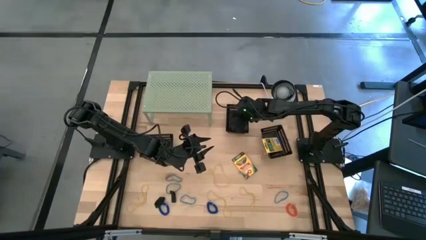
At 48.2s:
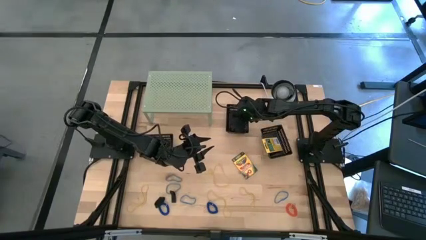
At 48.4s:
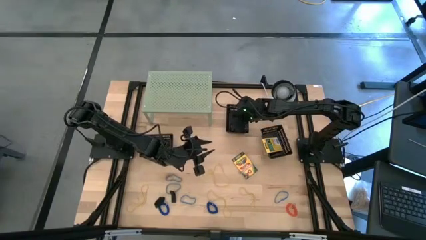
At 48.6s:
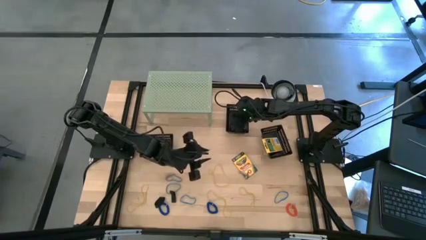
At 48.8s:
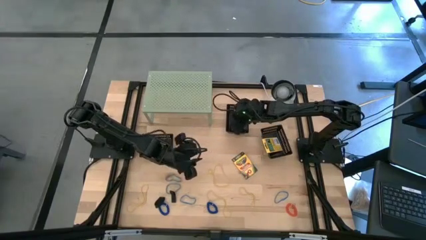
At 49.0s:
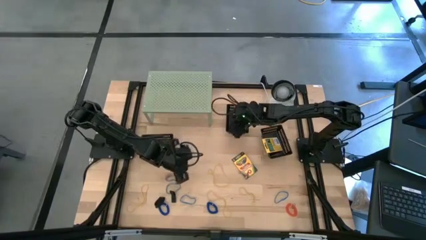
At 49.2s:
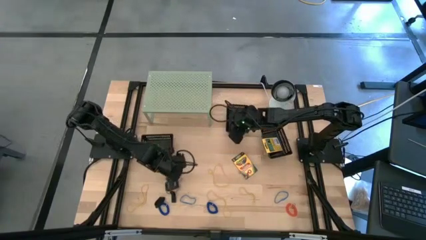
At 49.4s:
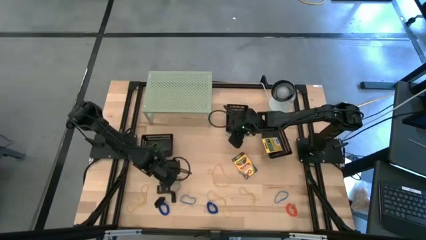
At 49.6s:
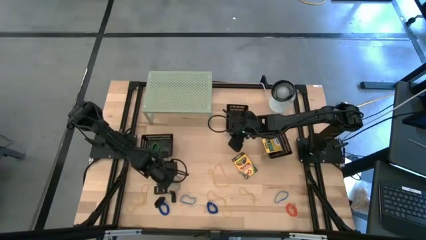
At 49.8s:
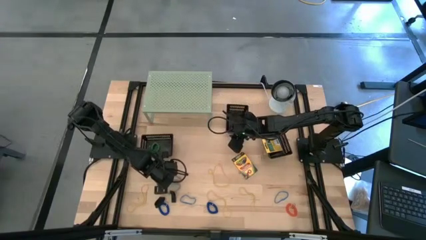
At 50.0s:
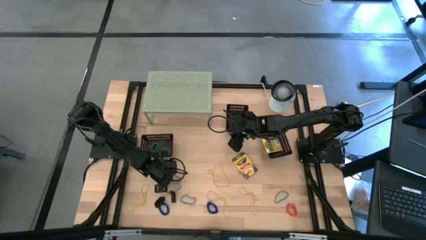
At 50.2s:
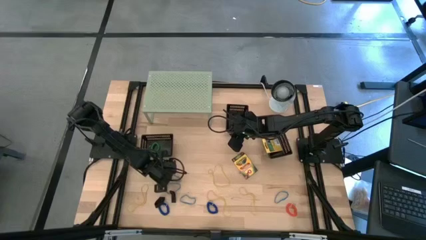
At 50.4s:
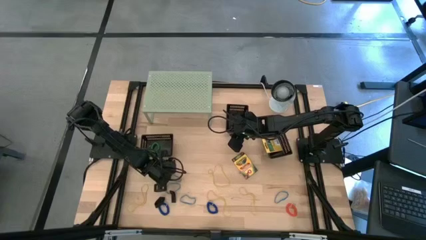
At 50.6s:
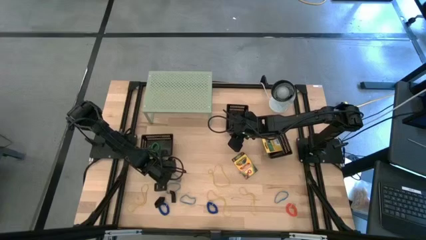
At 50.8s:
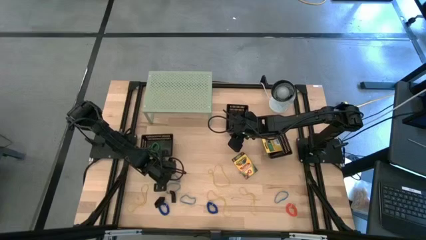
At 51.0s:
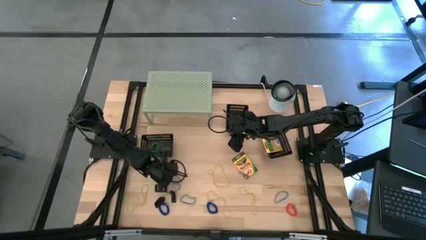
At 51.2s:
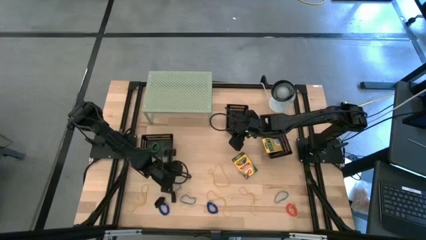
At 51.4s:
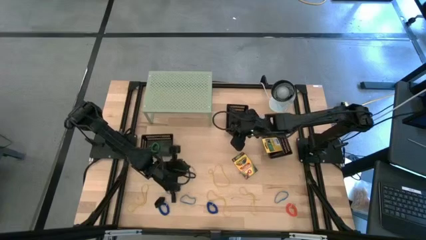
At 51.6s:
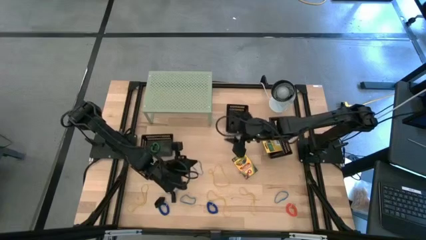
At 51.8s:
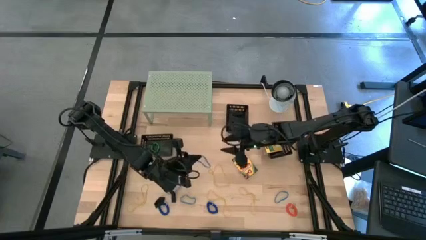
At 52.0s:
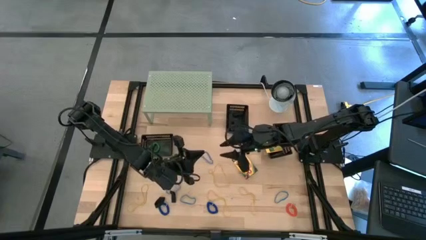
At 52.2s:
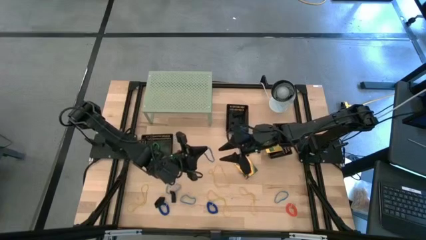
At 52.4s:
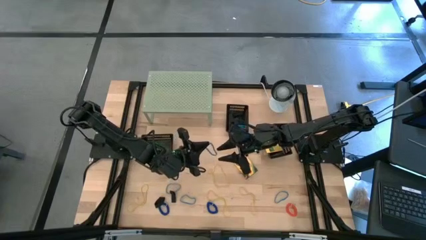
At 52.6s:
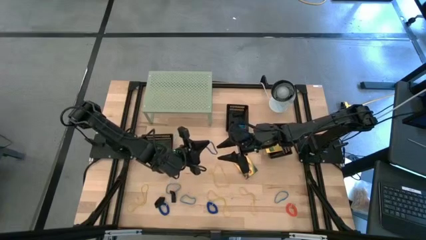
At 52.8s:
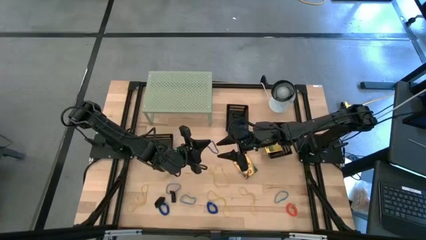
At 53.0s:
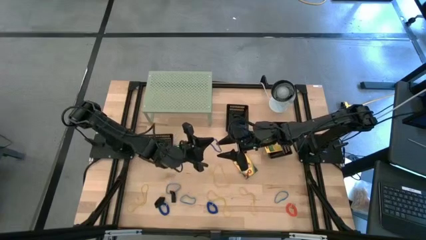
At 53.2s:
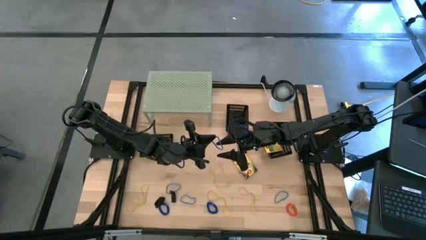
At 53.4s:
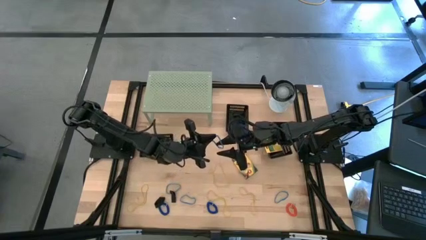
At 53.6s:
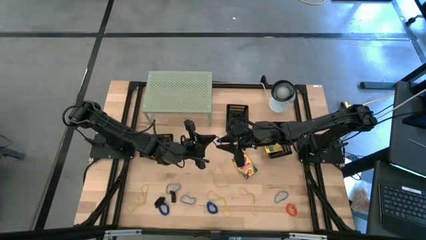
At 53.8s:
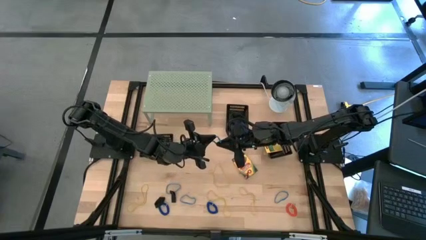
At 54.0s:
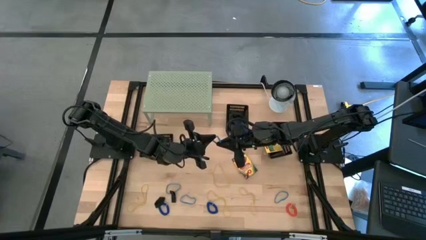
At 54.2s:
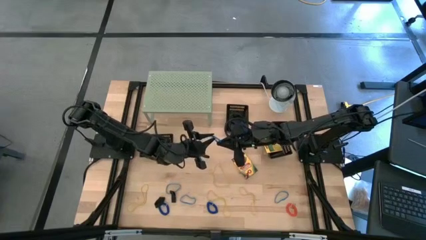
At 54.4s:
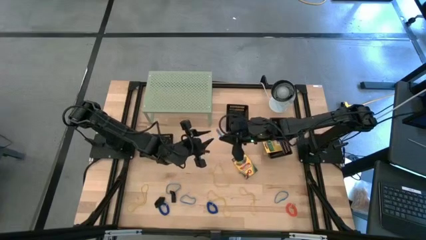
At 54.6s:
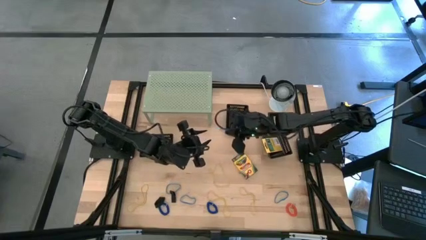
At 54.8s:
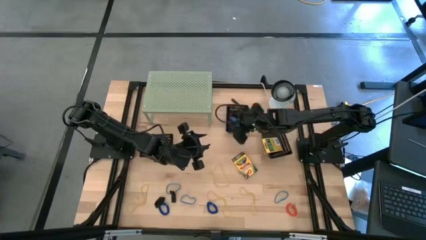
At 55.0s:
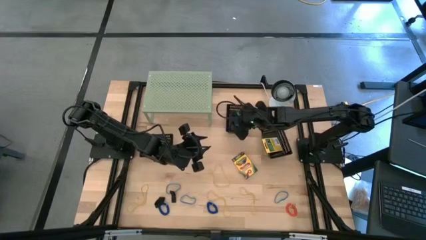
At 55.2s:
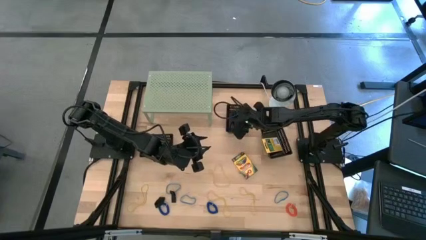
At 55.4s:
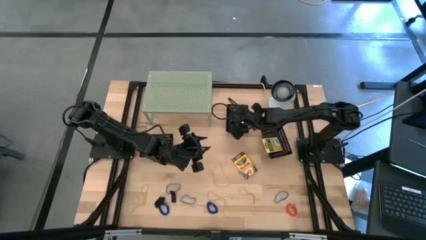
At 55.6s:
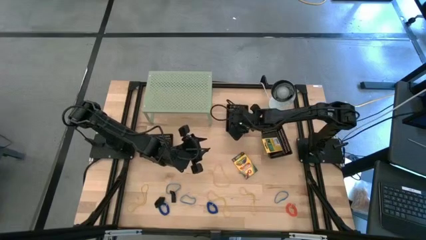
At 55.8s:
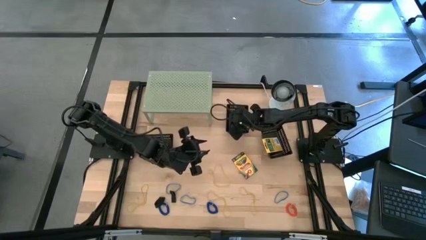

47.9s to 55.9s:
Task: Pick & Place Office Desk Supplies
Put the blue rubber band into the top black bin

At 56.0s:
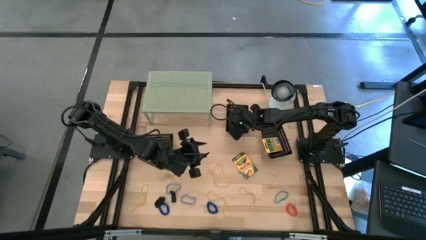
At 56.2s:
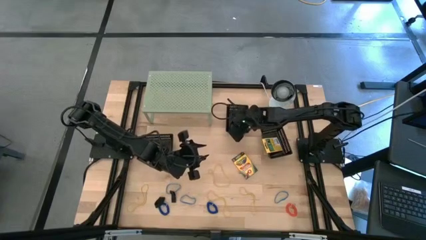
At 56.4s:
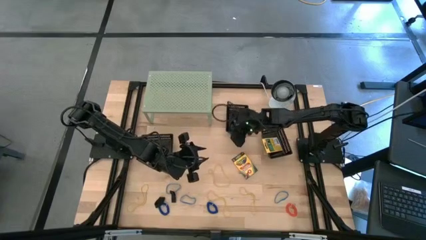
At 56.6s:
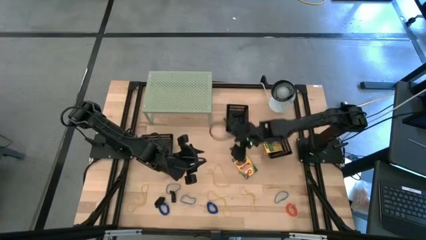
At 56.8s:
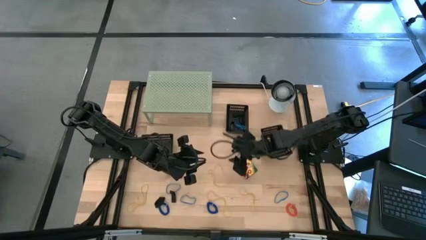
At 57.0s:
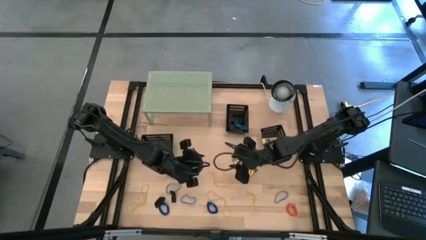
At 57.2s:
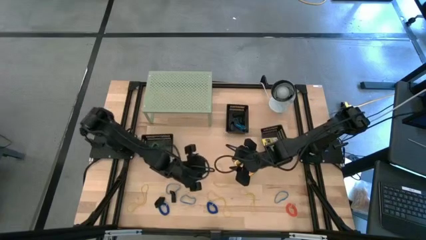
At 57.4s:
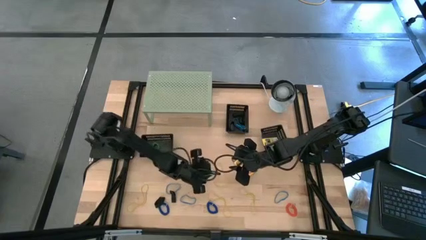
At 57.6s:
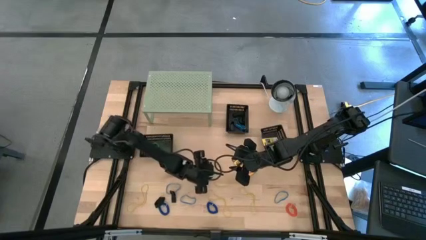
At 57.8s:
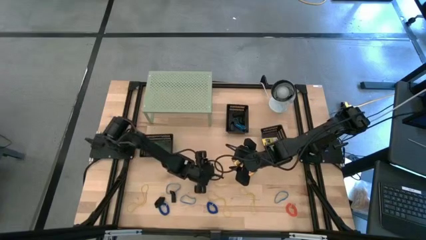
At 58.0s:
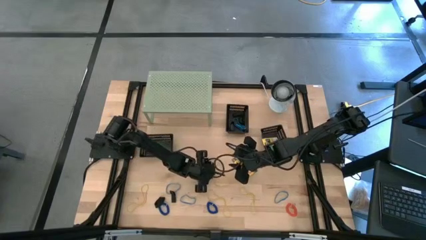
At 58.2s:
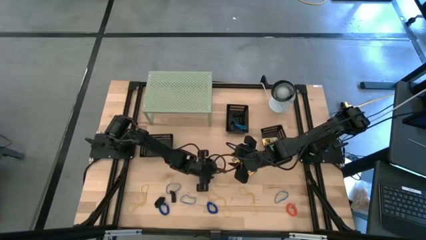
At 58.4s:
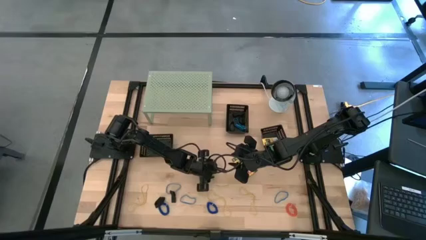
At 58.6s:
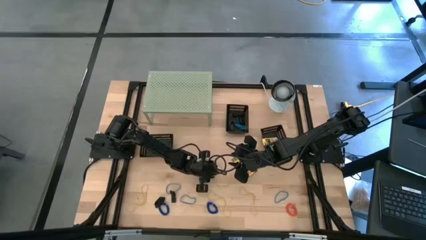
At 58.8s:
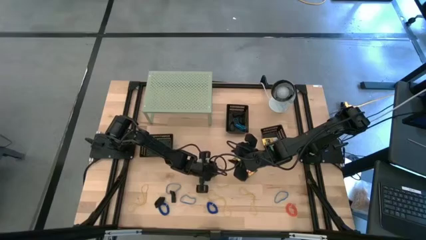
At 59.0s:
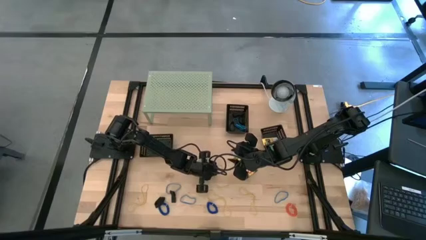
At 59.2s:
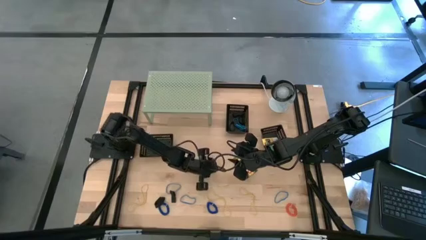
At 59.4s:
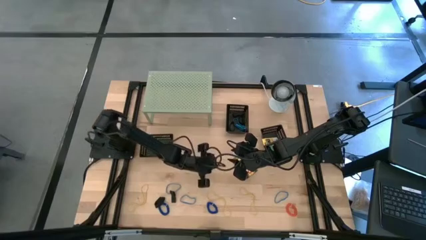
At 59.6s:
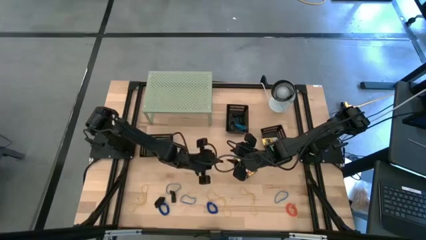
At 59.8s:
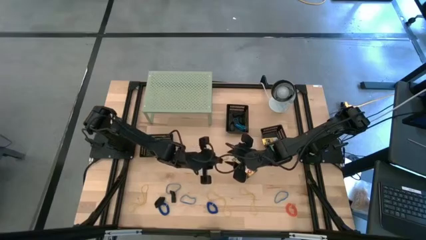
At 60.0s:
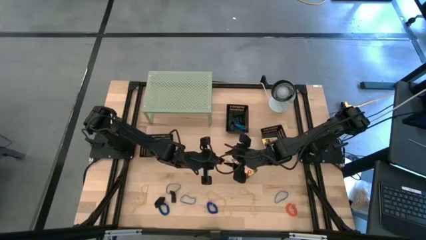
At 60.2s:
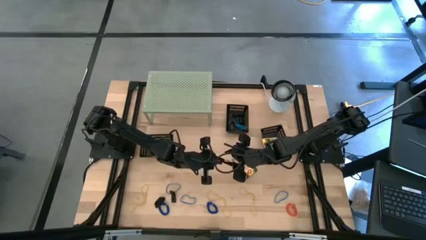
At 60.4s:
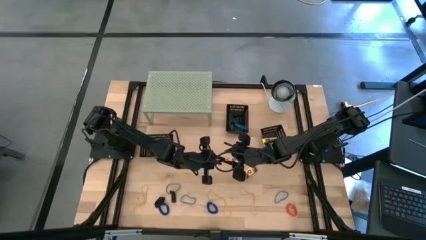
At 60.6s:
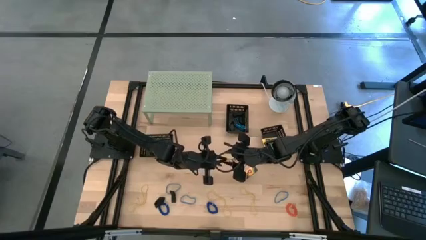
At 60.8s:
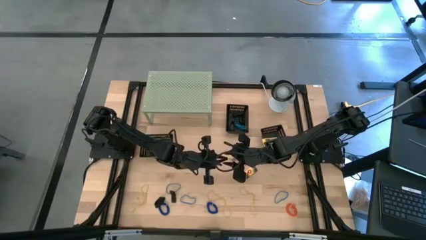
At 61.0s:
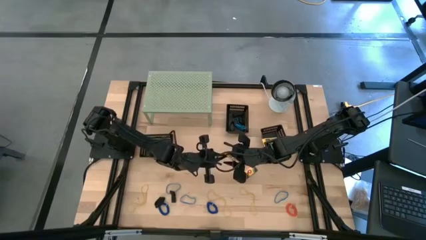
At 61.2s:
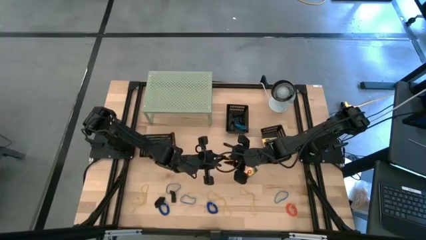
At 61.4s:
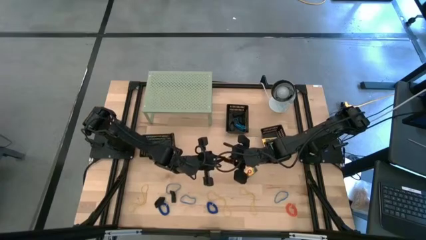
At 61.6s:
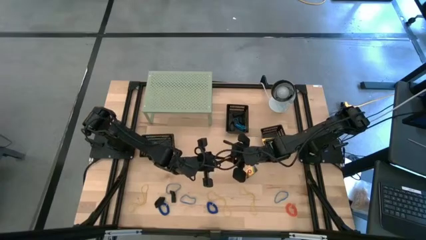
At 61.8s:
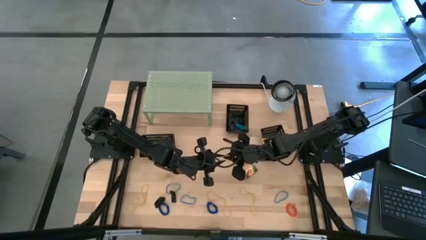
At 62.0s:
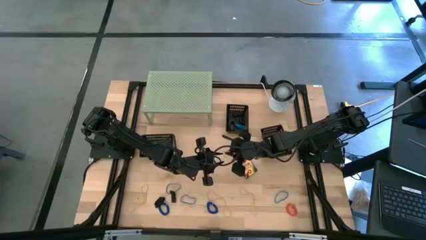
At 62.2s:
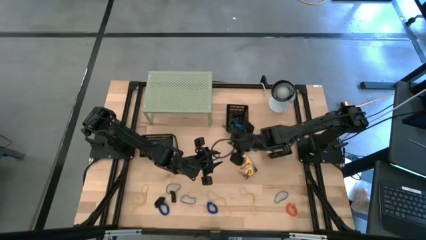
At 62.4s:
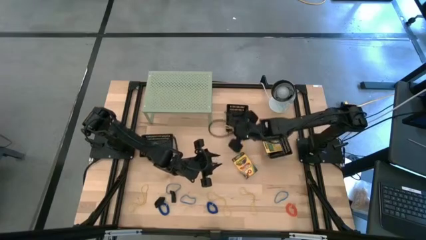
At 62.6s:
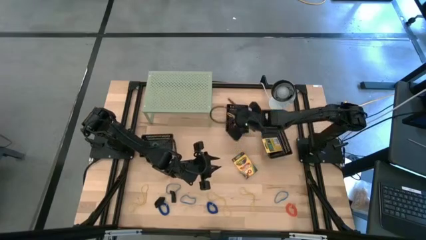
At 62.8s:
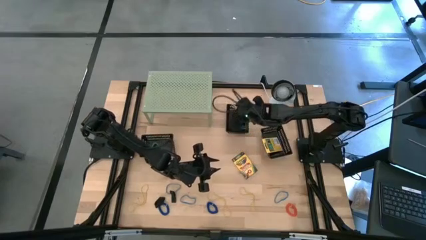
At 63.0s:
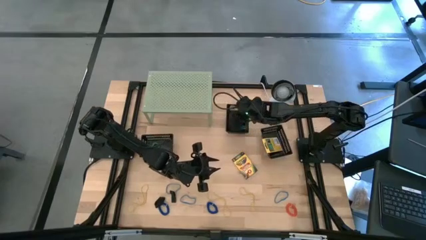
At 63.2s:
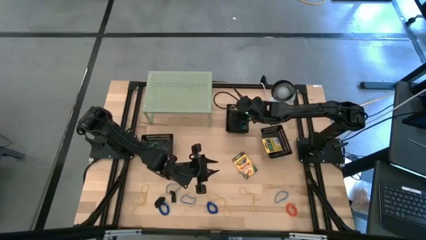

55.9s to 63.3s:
Put the yellow rubber band into the top black bin

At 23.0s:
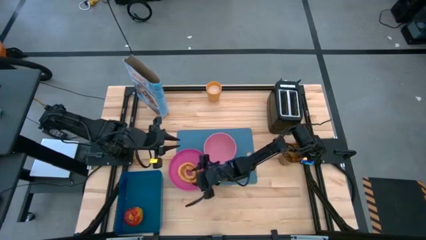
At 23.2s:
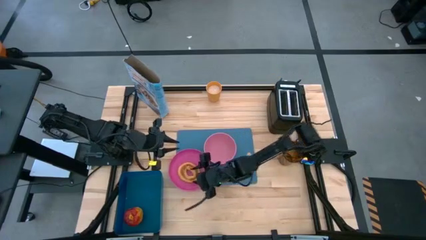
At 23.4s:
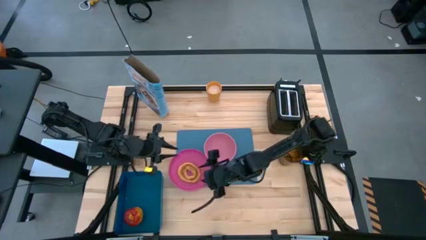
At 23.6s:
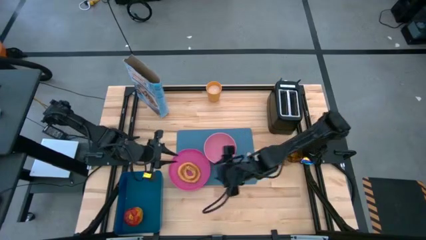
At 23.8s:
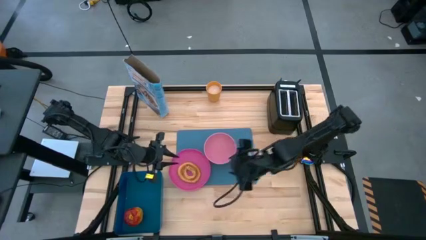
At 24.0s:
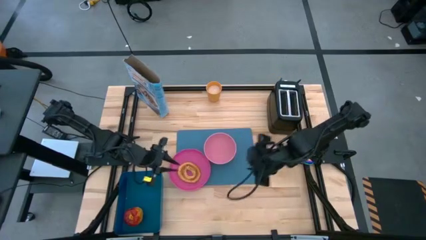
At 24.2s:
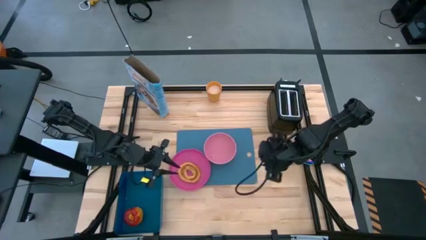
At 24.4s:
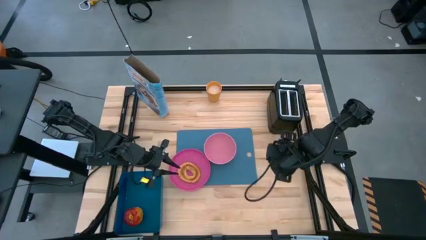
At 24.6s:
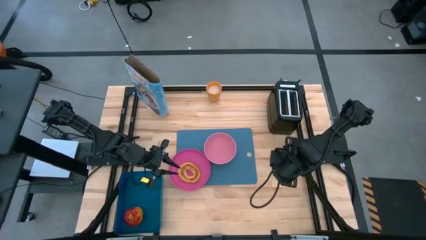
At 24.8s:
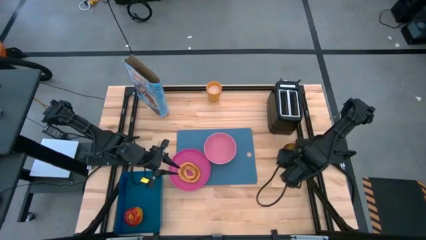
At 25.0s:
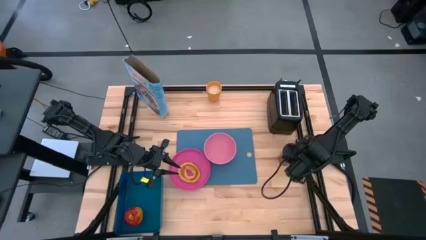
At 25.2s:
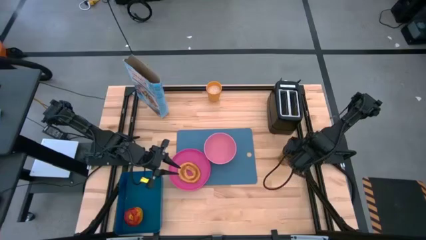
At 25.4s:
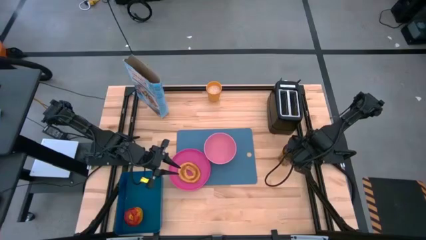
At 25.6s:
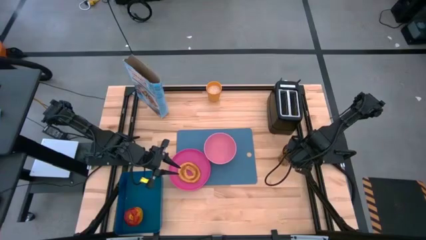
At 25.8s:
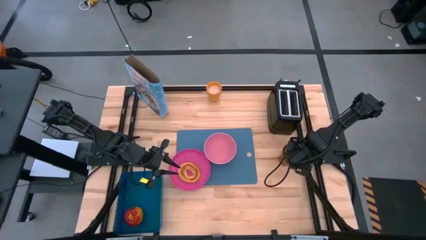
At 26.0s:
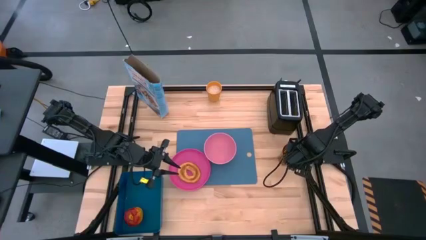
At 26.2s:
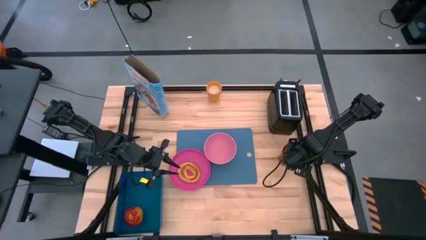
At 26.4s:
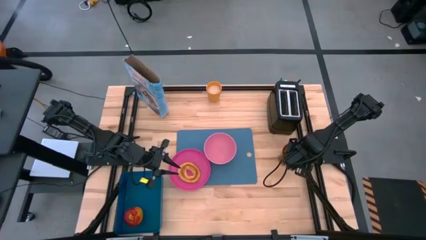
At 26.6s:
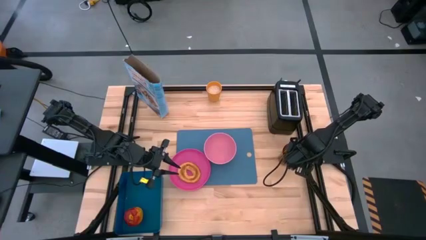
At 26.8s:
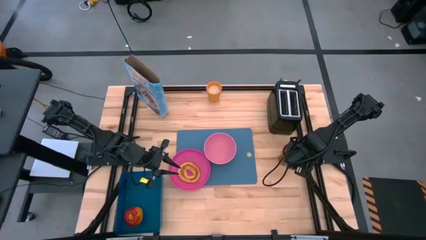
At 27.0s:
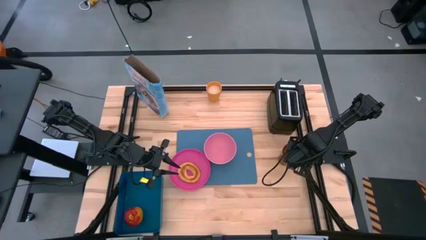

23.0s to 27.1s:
Task: Arrange a breakfast setting
Put the blue spoon on the blue tablemat to the right of the pink bowl
